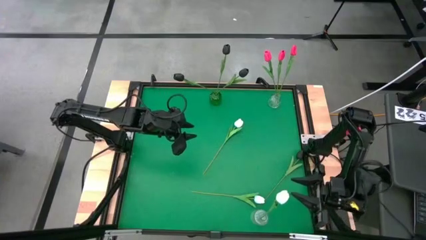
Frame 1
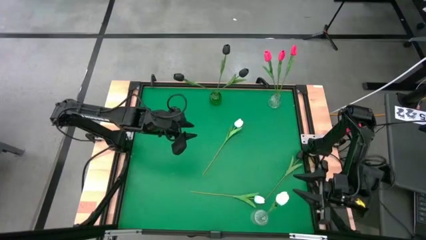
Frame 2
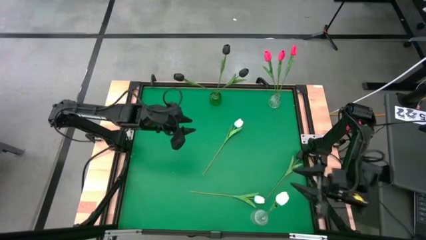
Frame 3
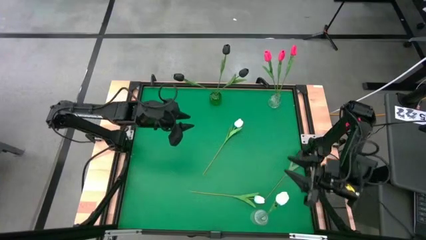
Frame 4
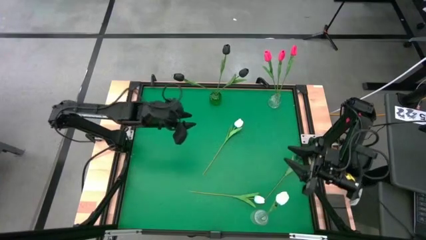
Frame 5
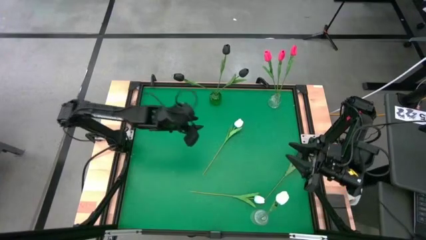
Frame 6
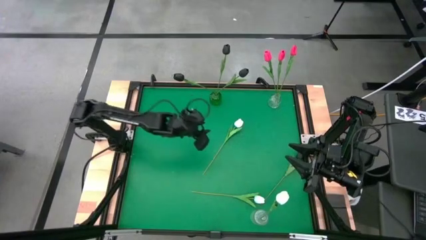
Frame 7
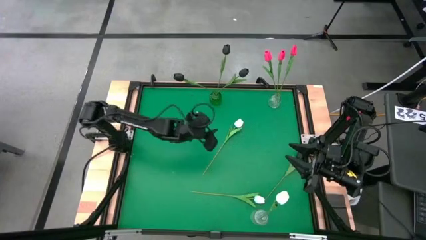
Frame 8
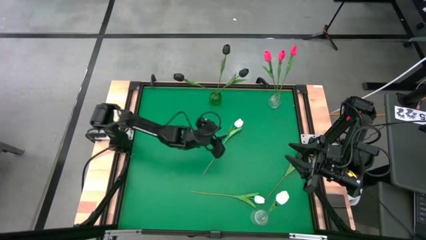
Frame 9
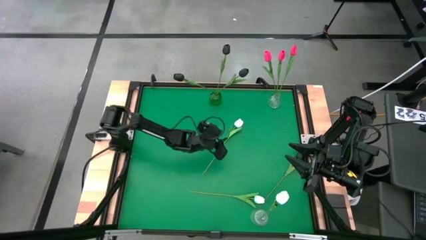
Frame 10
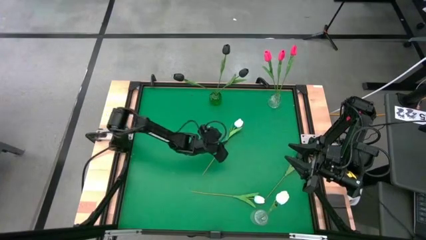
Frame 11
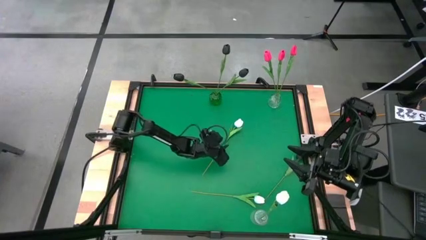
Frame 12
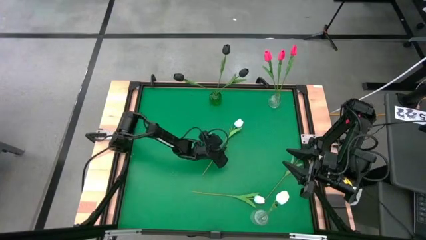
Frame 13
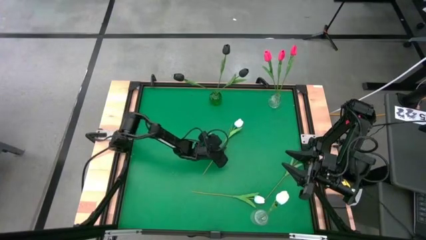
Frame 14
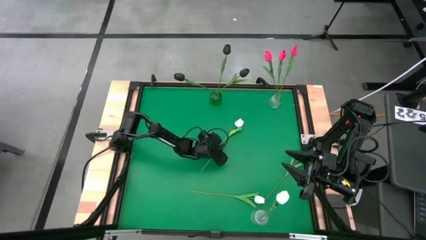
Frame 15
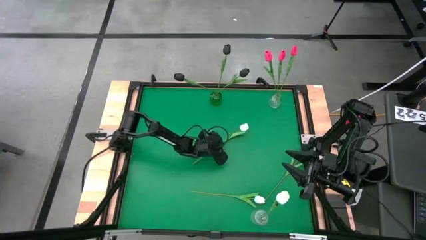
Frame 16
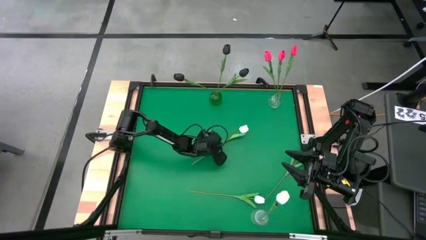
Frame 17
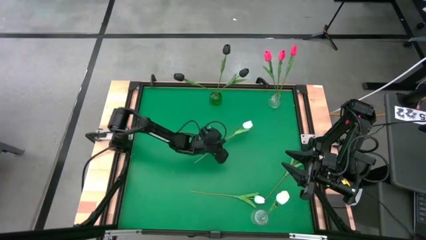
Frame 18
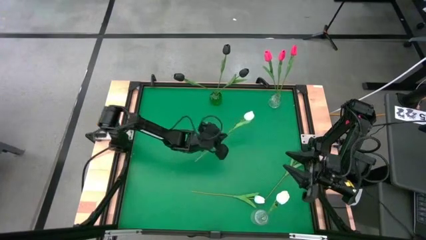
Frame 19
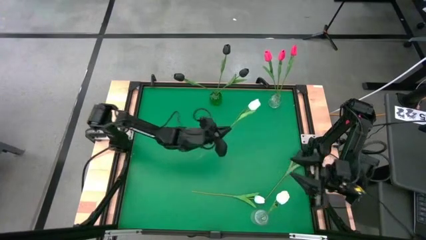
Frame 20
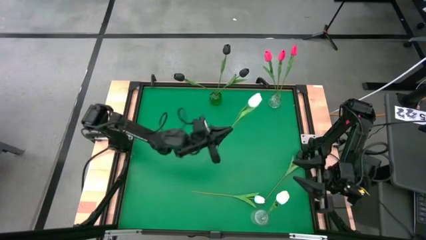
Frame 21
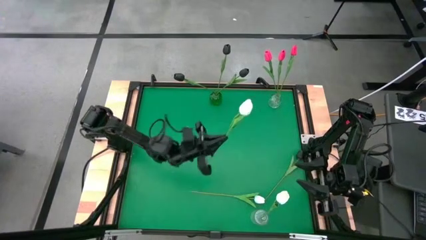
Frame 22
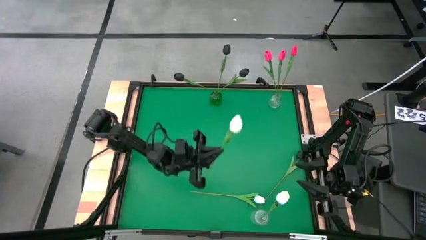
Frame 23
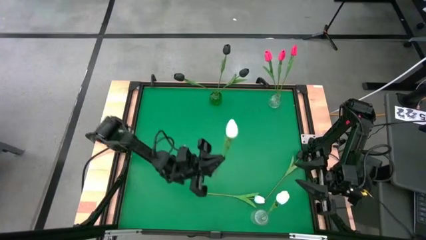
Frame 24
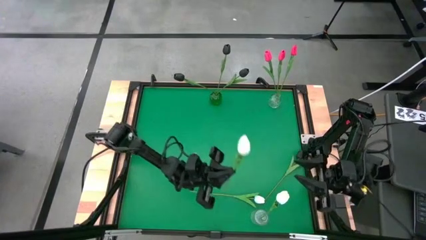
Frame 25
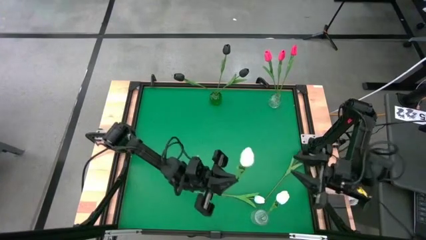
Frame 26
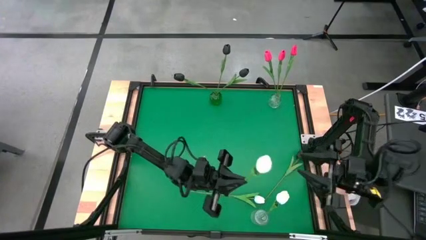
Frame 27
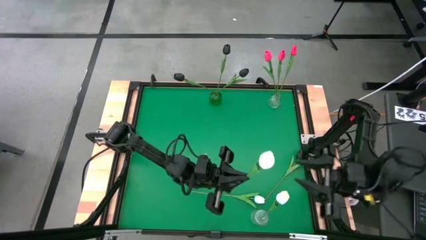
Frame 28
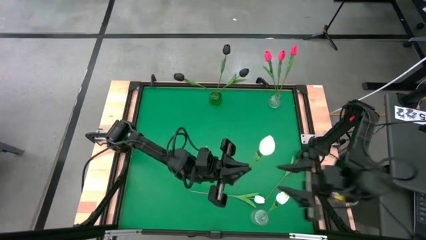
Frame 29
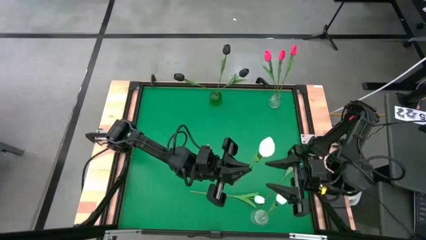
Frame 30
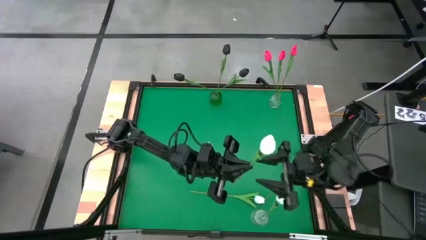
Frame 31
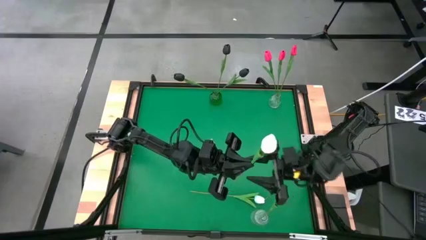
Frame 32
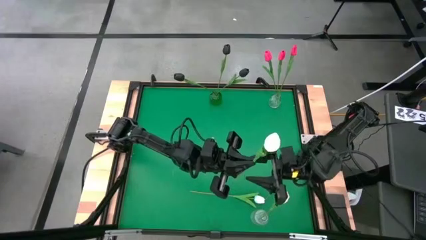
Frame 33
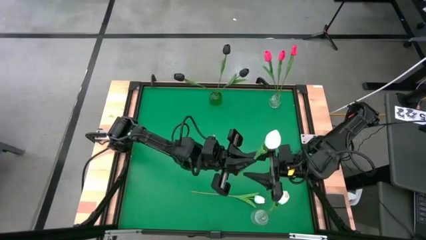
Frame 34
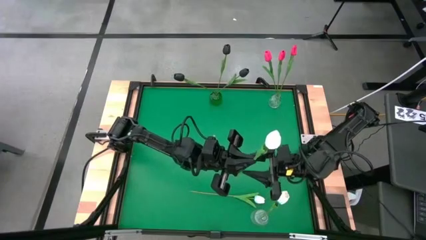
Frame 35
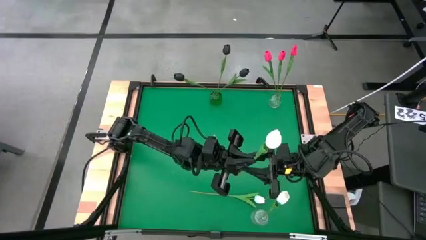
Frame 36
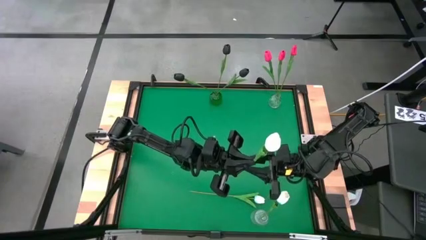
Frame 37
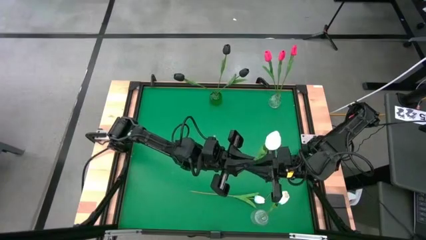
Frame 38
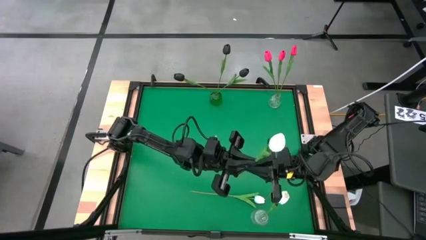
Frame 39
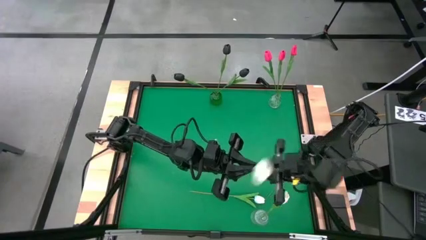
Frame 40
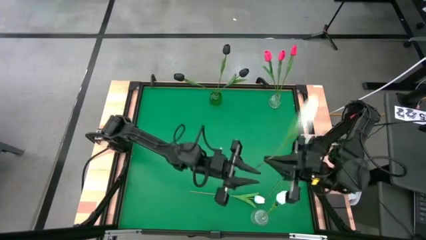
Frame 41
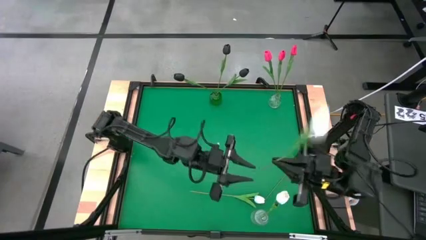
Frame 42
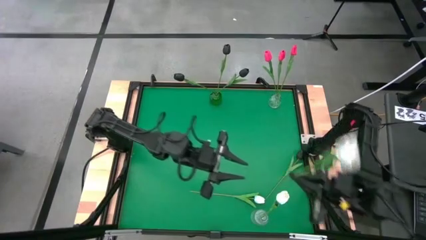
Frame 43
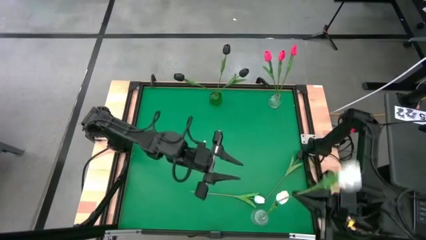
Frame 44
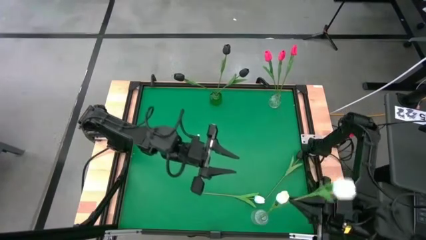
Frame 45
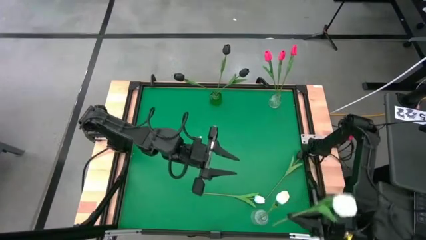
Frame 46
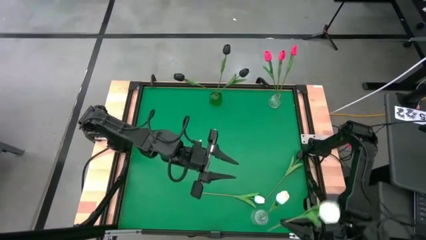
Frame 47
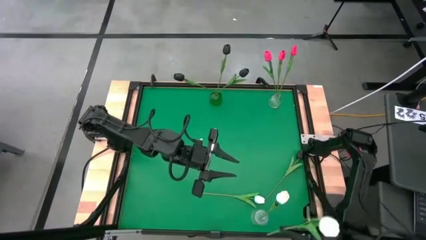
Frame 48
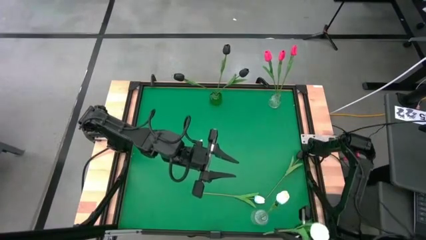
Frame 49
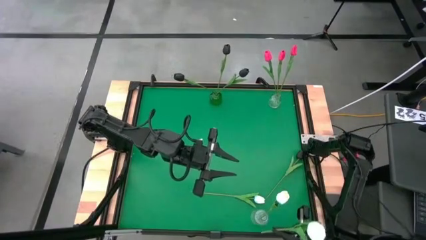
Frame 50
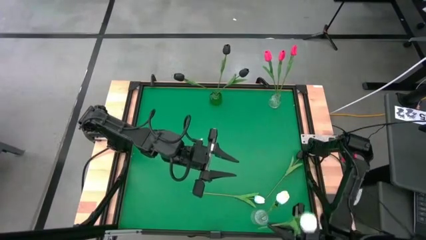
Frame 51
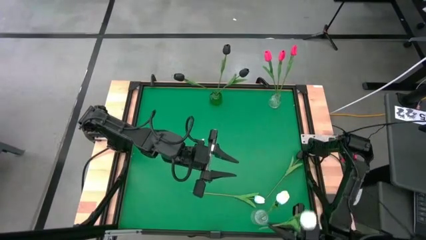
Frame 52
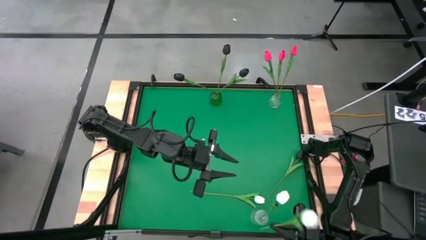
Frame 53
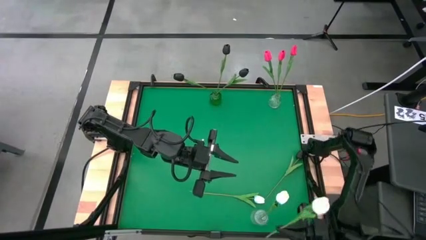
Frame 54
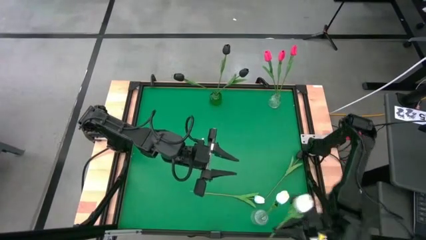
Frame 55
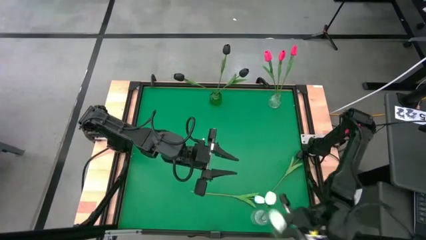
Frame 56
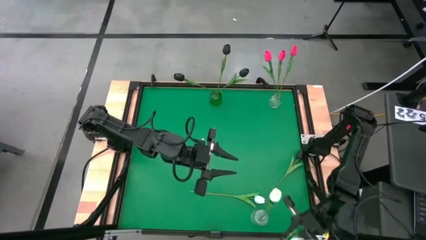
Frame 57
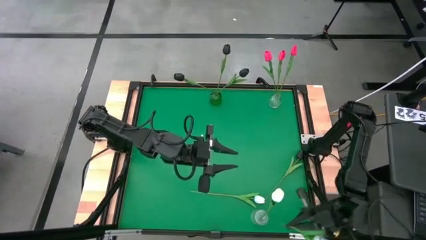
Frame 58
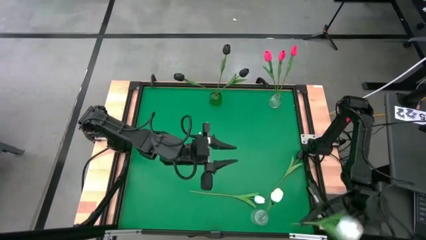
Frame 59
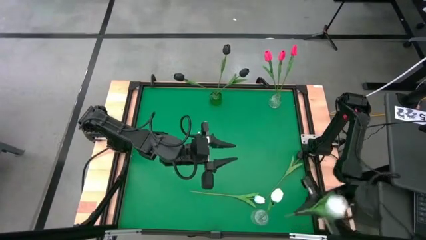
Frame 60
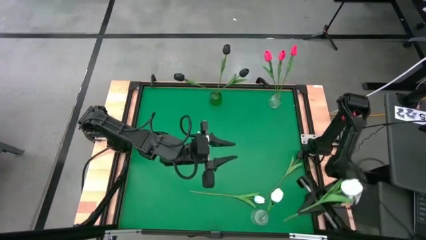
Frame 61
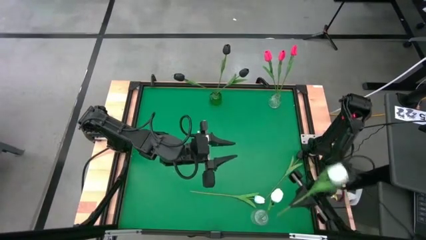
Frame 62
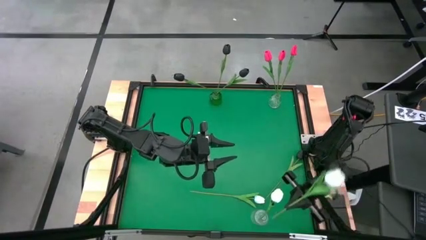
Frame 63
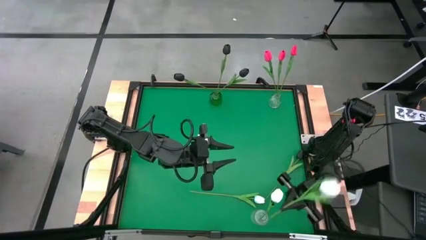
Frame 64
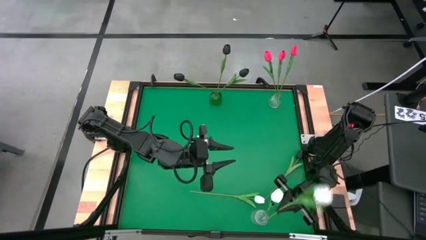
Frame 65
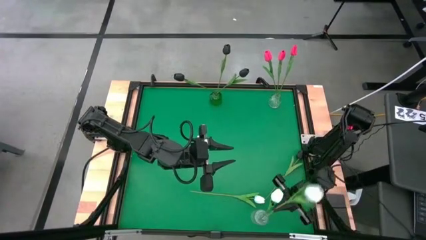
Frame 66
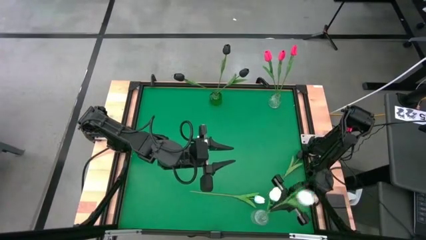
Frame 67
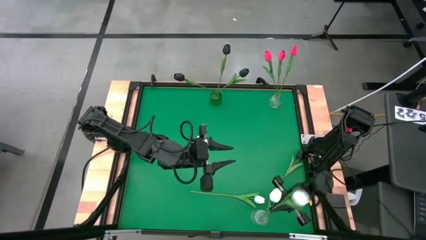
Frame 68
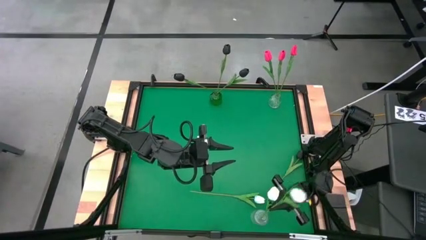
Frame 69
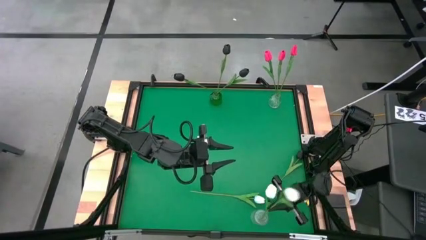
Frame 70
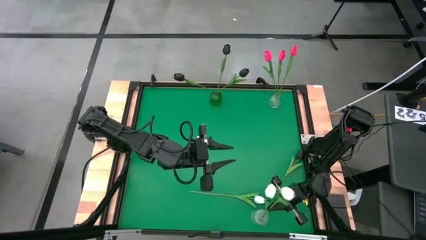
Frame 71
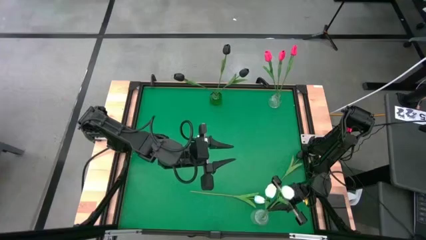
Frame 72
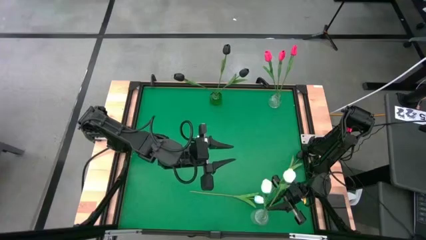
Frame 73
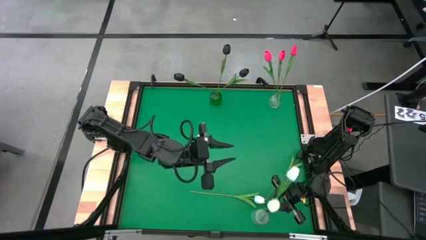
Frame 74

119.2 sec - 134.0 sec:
Task: Sort flowers into vase by color
Put the white tulip into the bottom transparent vase
